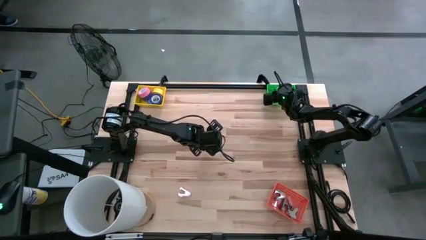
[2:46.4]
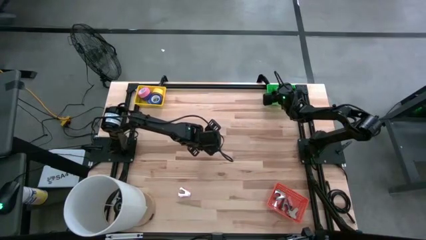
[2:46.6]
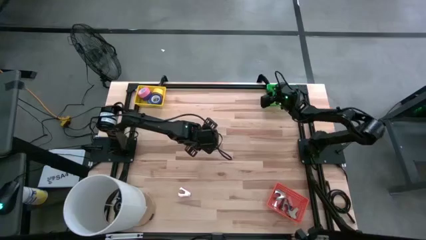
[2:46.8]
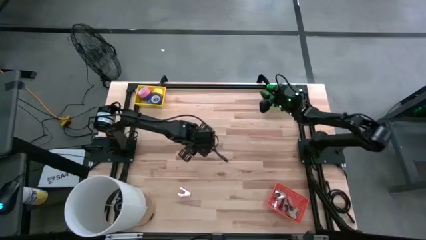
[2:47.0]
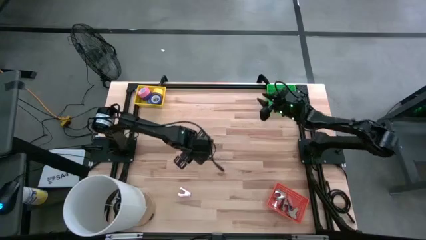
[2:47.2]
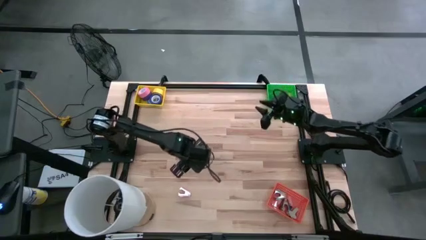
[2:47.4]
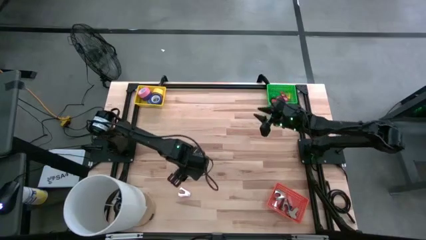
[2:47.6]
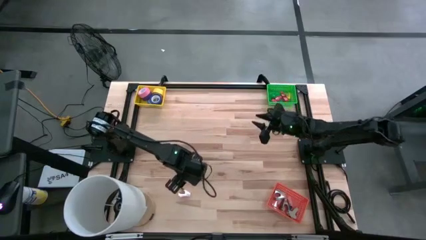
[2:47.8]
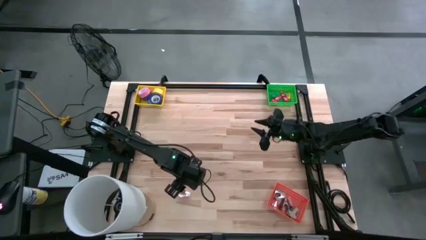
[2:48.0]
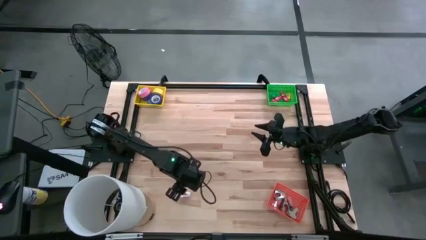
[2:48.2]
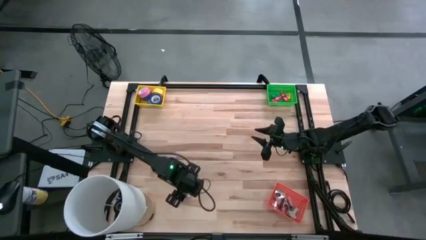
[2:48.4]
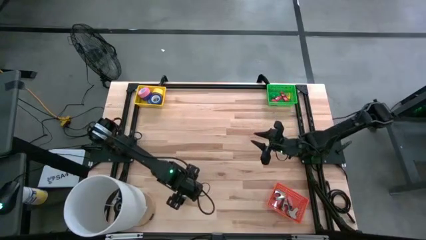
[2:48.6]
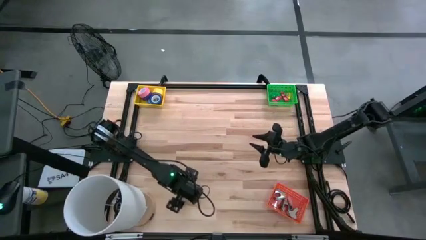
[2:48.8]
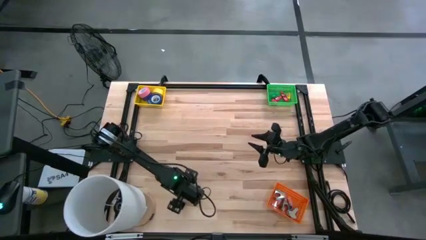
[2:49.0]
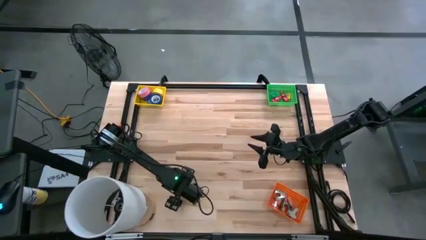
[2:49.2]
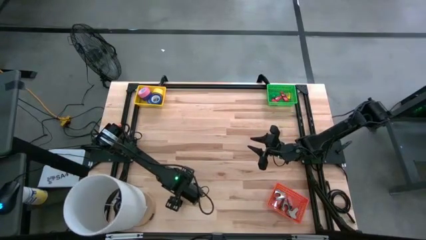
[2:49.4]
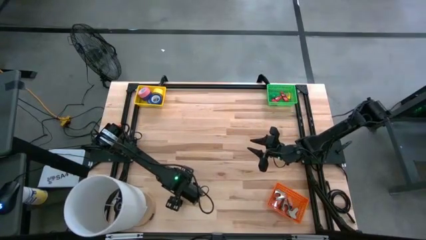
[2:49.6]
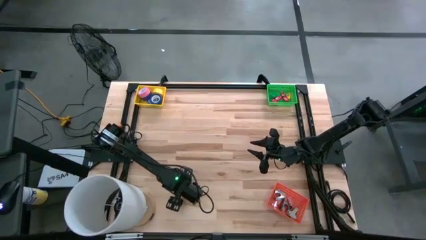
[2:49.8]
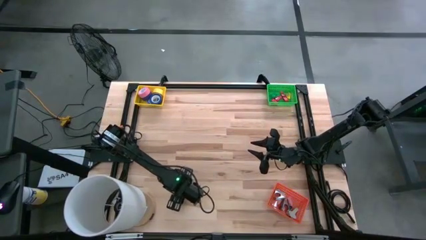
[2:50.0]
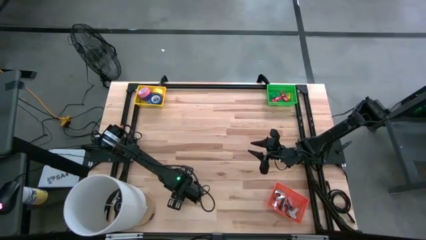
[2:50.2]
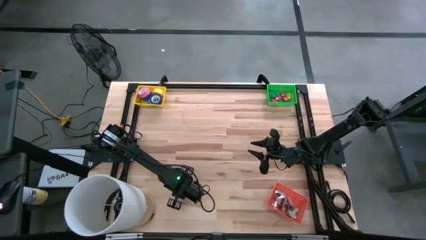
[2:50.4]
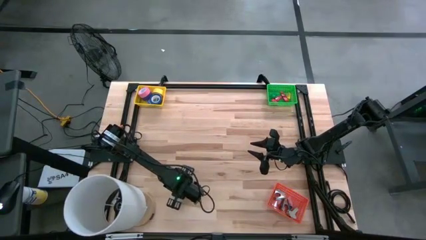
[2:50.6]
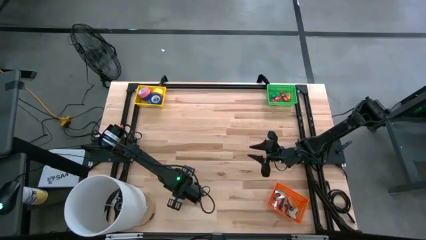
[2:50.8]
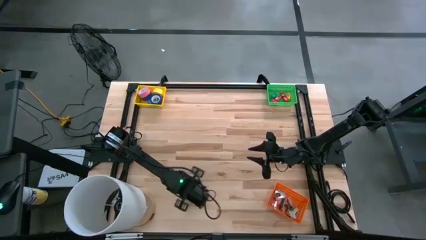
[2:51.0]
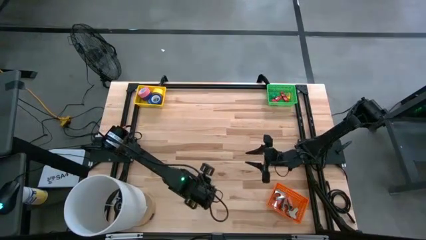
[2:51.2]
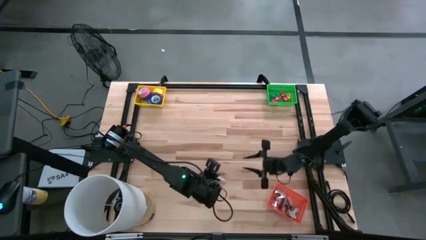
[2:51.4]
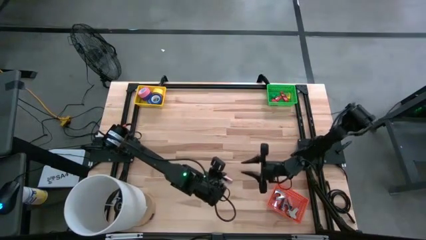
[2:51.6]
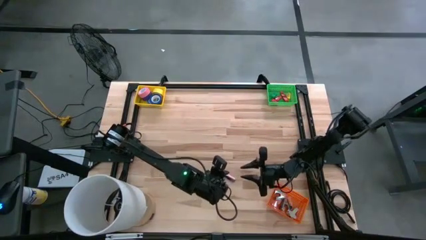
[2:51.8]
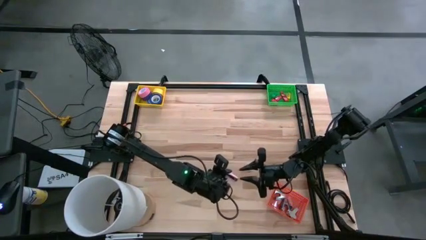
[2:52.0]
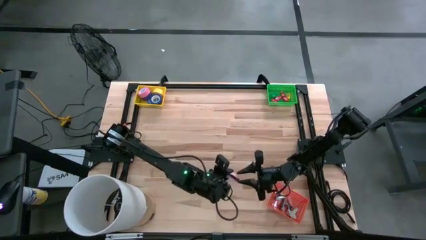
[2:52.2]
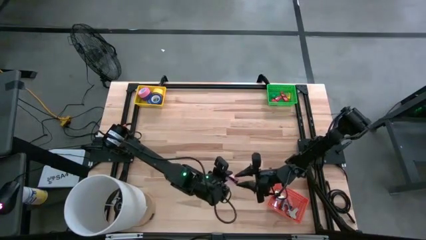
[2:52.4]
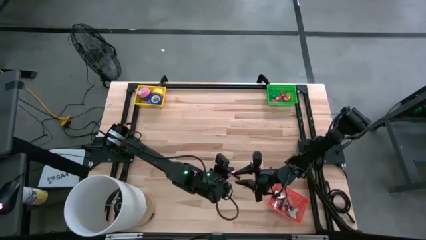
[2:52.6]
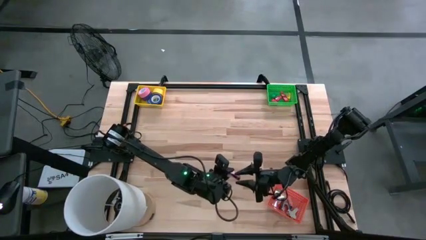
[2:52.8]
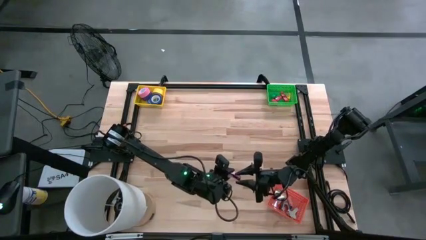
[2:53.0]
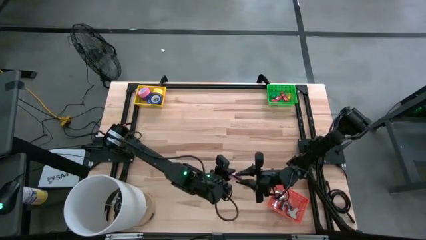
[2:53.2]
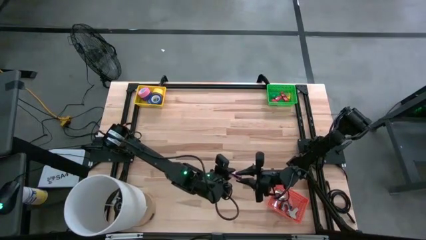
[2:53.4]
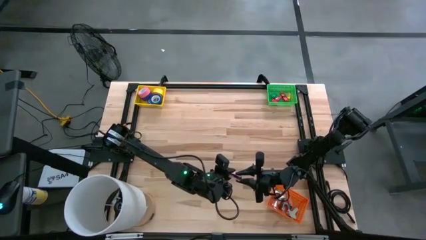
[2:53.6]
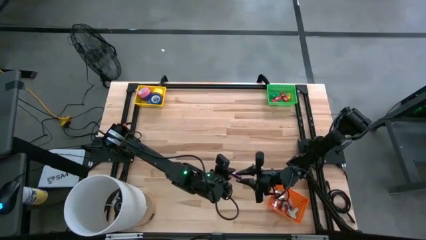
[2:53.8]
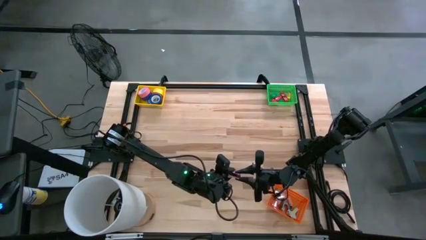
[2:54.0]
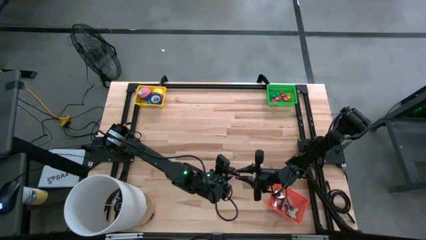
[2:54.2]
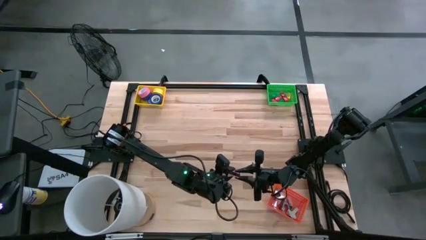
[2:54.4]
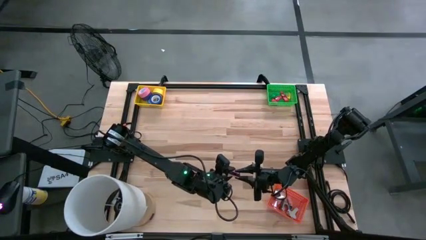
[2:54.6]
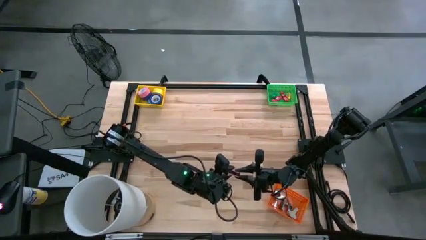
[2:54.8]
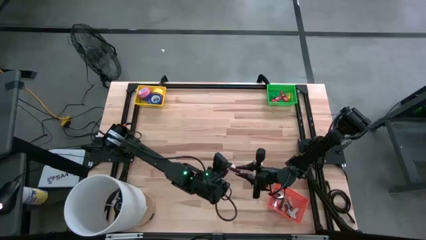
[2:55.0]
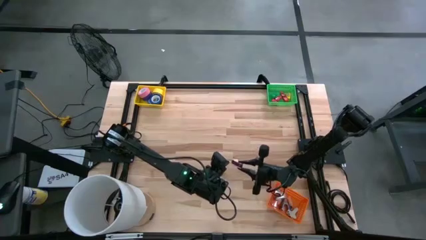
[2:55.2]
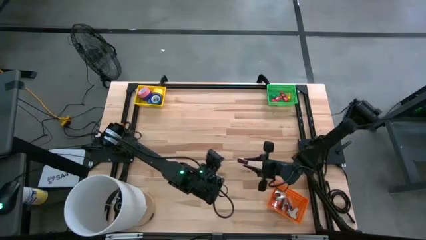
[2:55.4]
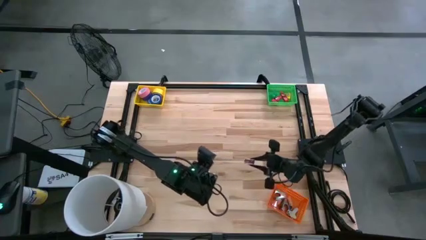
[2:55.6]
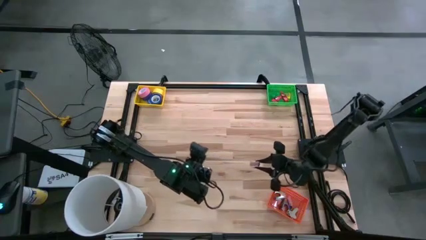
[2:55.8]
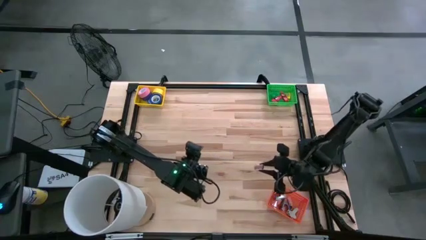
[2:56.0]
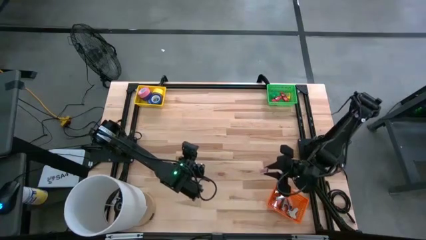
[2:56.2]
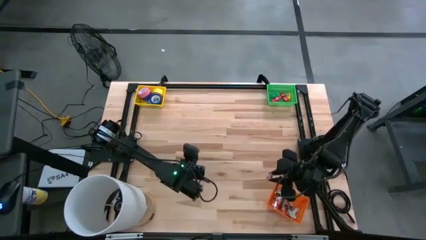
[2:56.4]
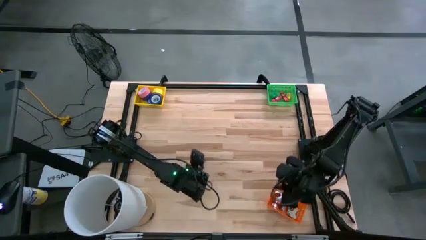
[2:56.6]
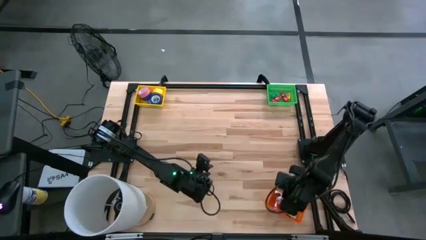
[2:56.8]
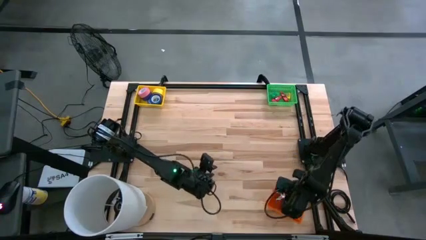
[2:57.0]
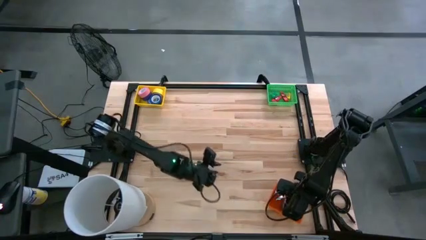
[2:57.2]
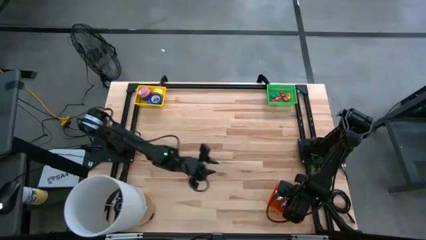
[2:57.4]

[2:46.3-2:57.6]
Task: Pick and place Stapler, Stapler remover, tape
Put the pink staple remover into the orange bin

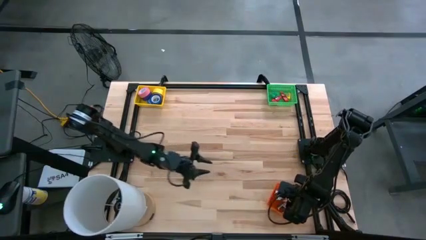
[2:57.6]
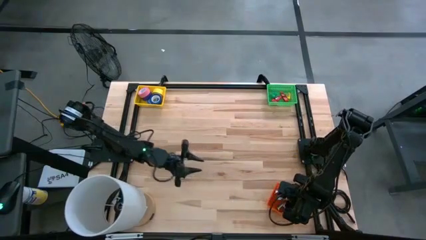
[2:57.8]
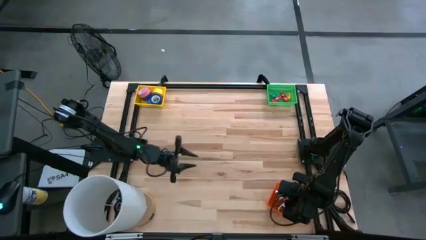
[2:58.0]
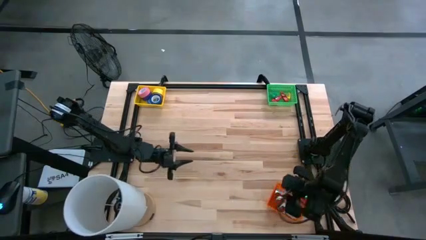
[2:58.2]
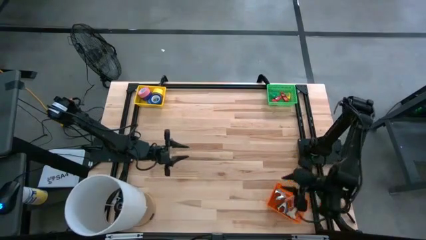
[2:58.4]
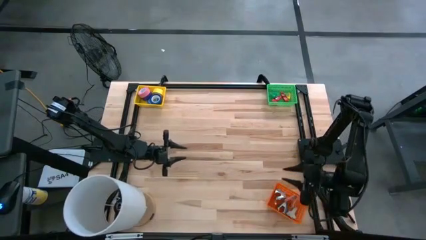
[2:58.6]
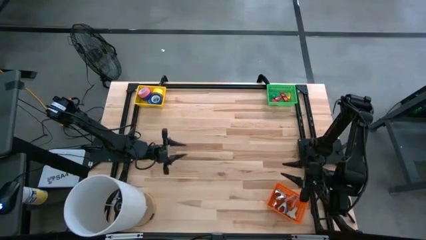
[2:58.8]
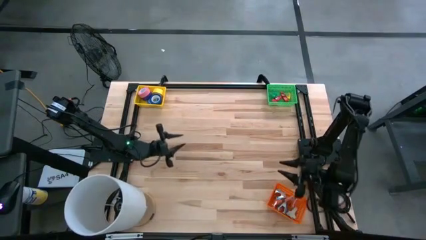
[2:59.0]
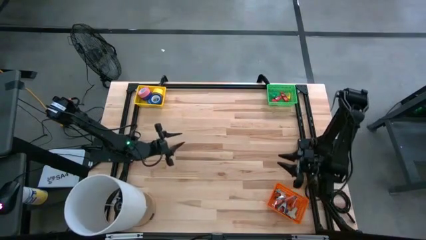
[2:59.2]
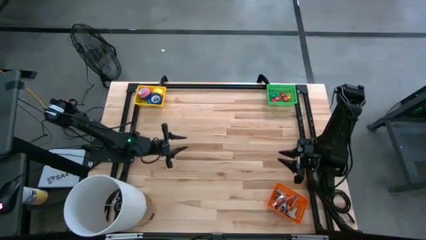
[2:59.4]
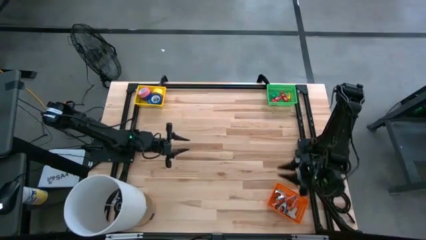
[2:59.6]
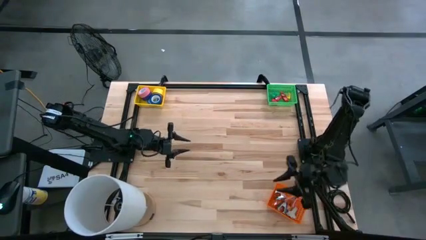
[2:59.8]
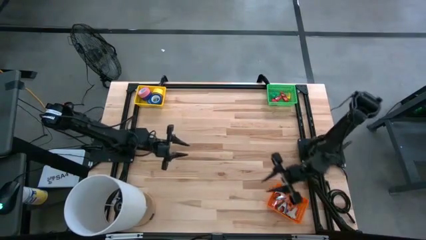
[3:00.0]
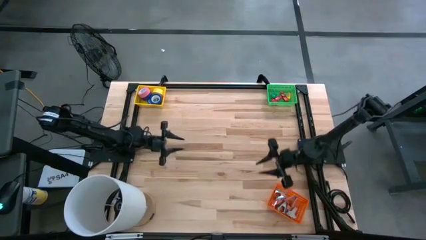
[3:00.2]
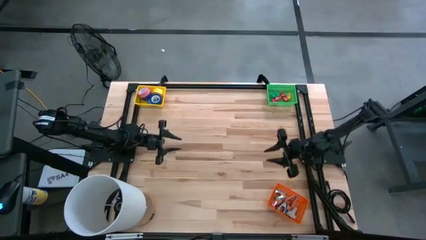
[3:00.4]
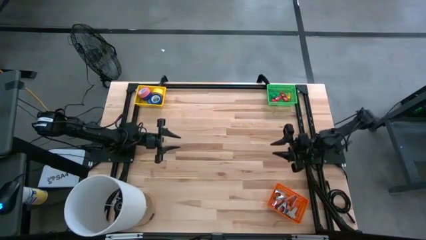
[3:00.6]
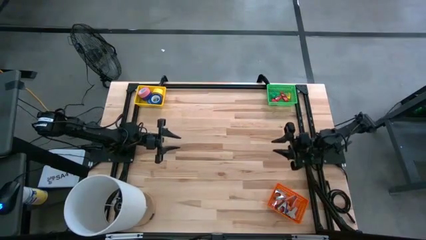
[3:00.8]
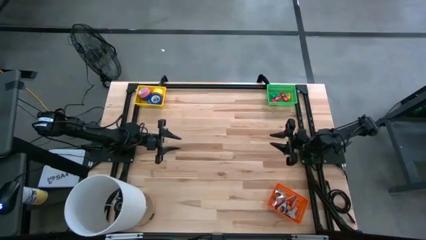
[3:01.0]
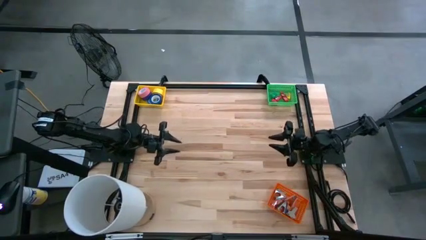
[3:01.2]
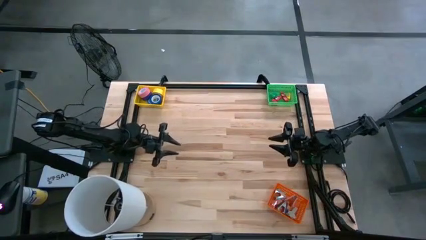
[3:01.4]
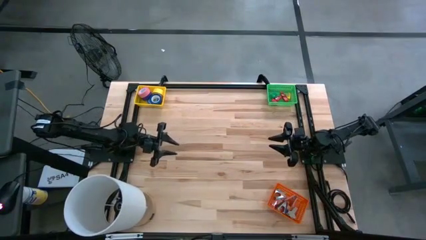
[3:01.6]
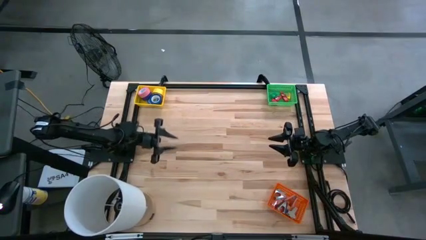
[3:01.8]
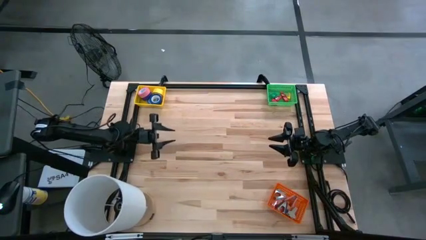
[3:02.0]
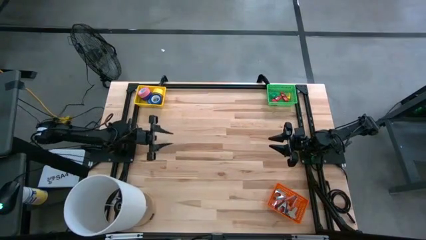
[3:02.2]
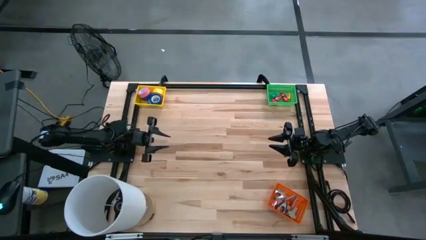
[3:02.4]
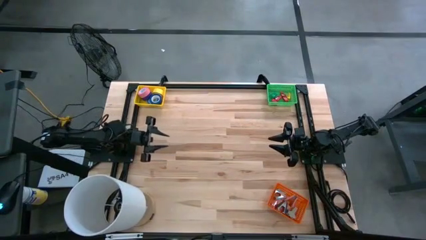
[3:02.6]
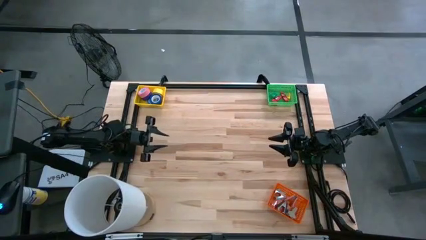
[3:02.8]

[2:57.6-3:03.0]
Return to Home Position
